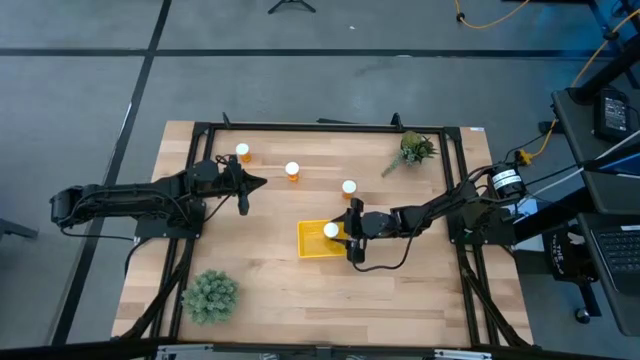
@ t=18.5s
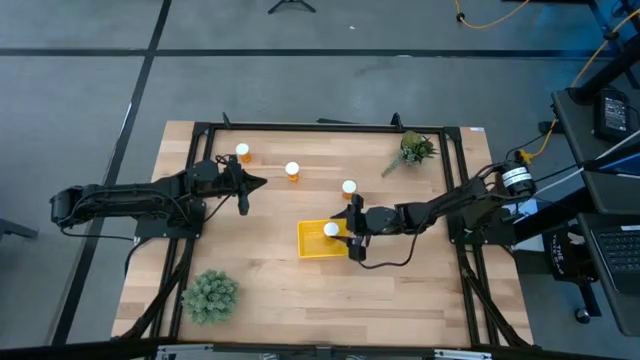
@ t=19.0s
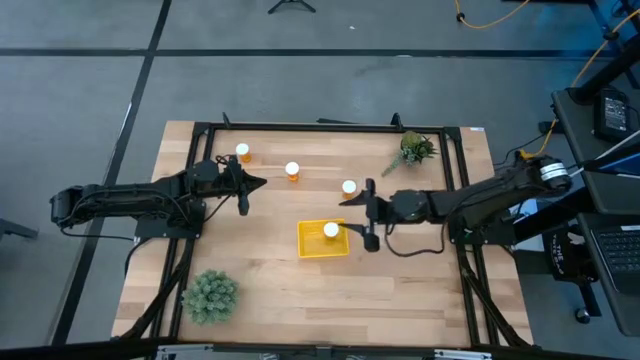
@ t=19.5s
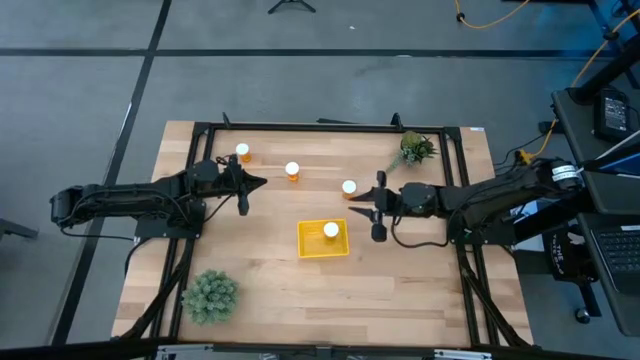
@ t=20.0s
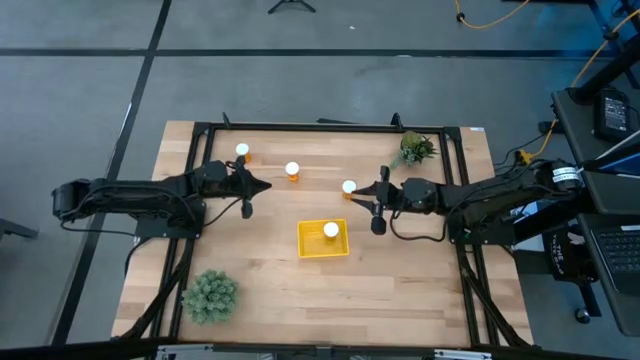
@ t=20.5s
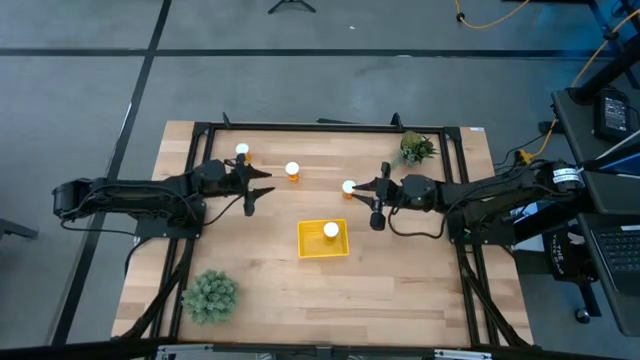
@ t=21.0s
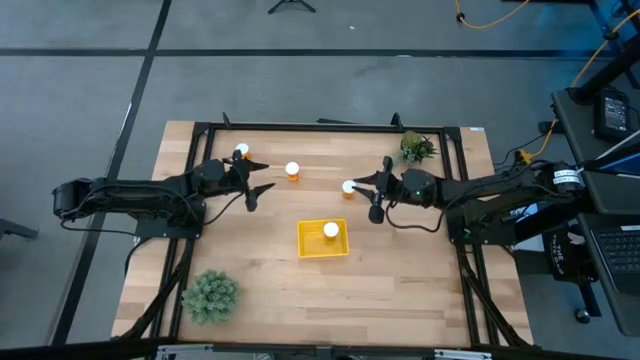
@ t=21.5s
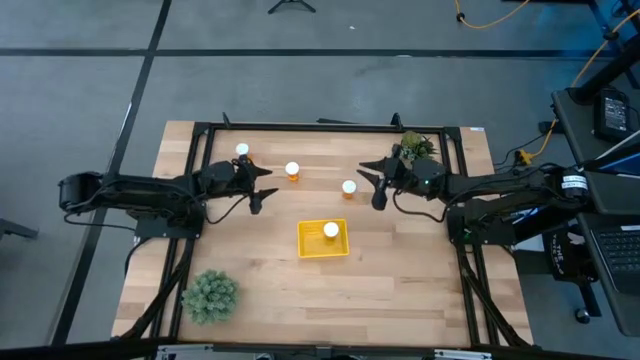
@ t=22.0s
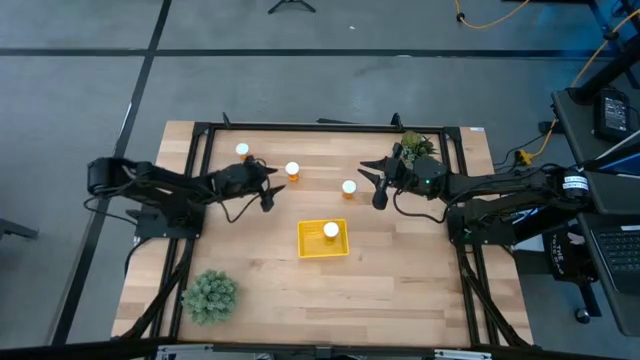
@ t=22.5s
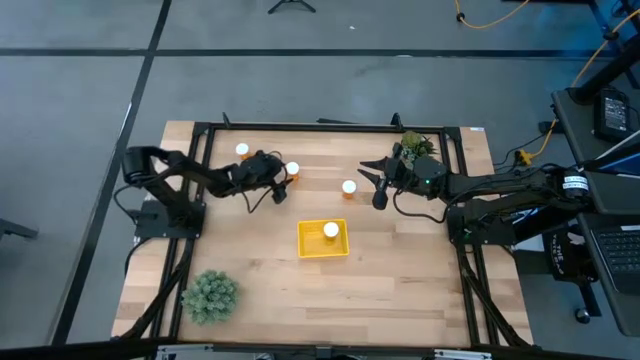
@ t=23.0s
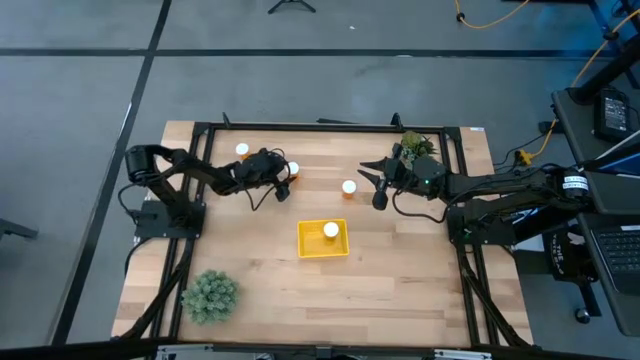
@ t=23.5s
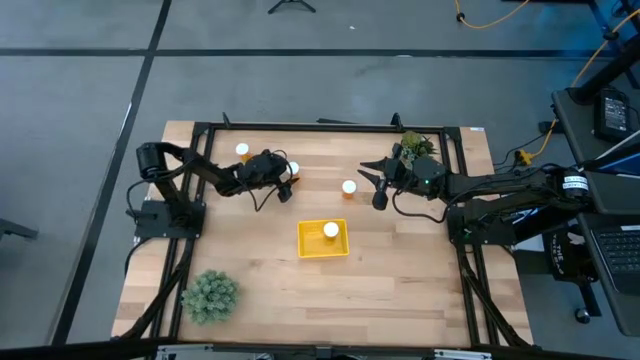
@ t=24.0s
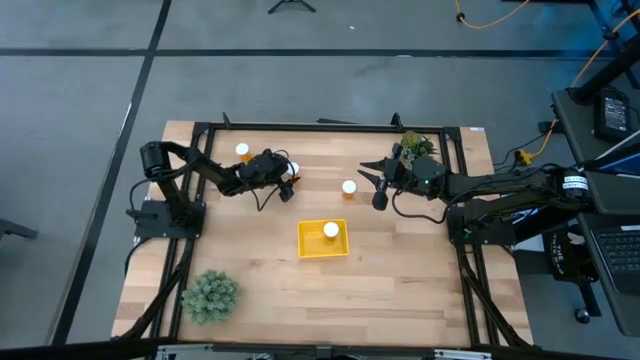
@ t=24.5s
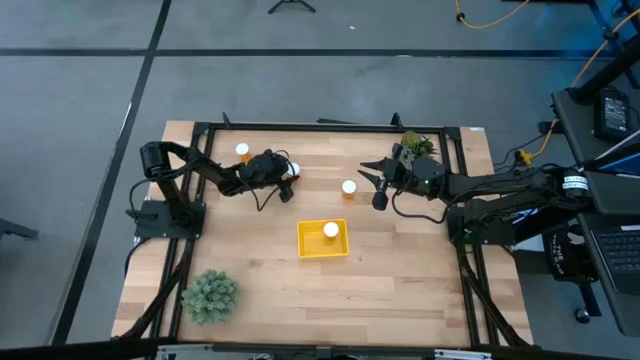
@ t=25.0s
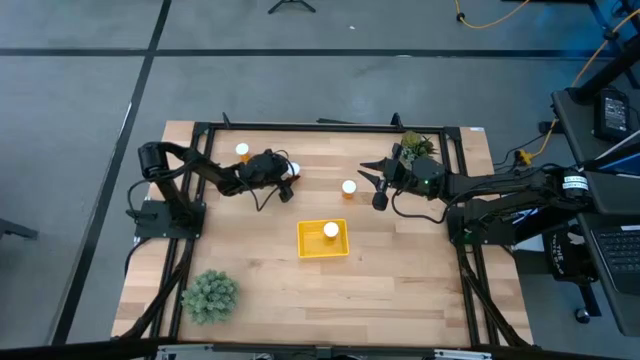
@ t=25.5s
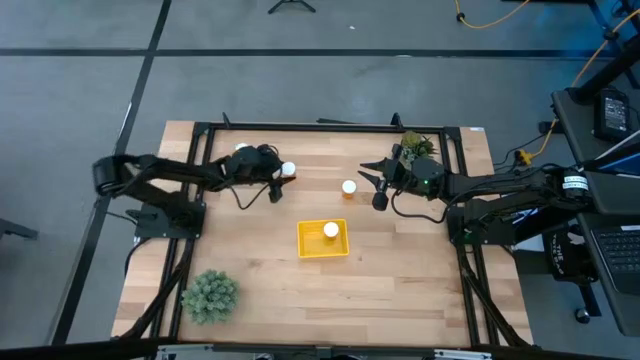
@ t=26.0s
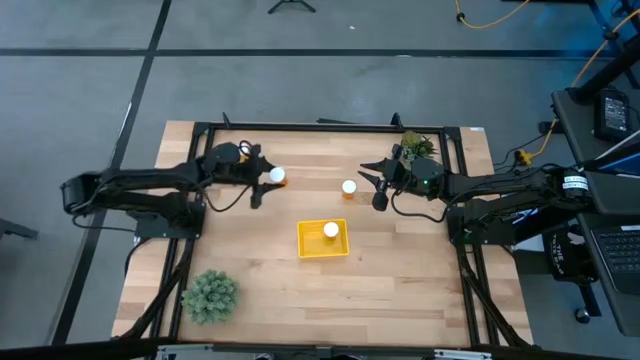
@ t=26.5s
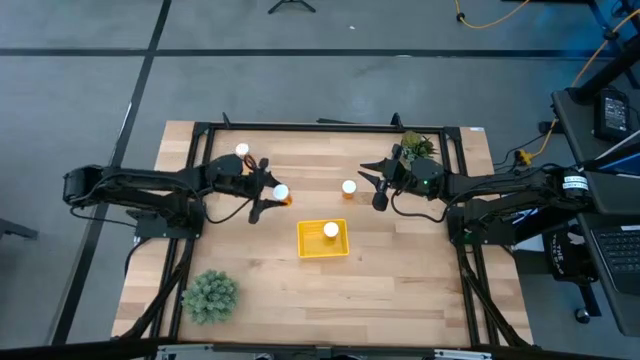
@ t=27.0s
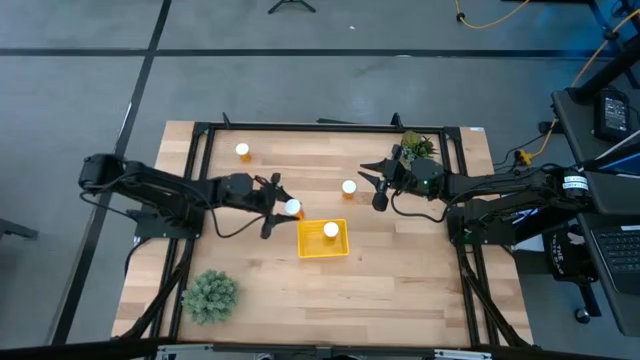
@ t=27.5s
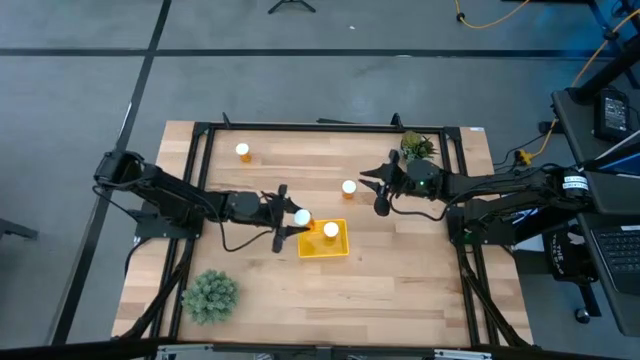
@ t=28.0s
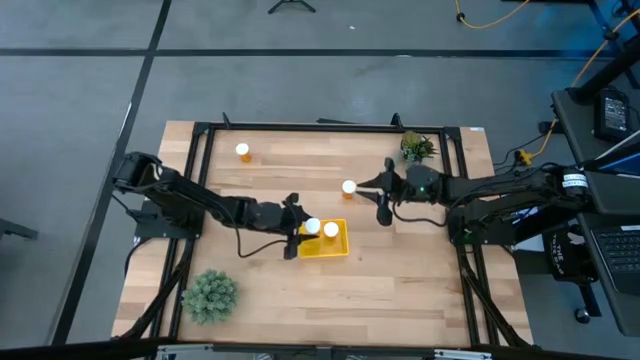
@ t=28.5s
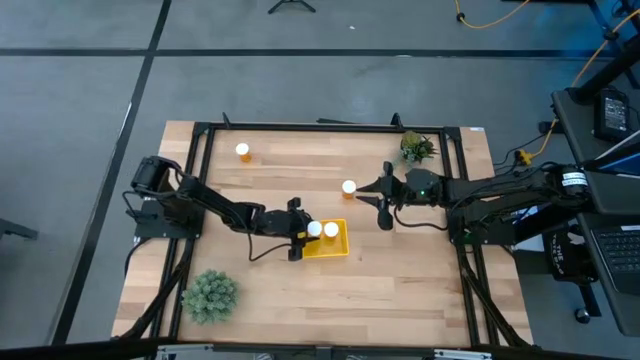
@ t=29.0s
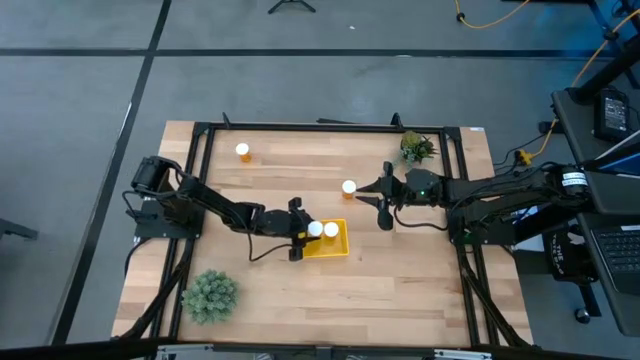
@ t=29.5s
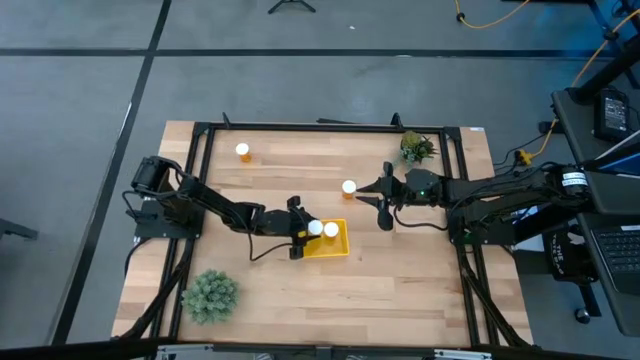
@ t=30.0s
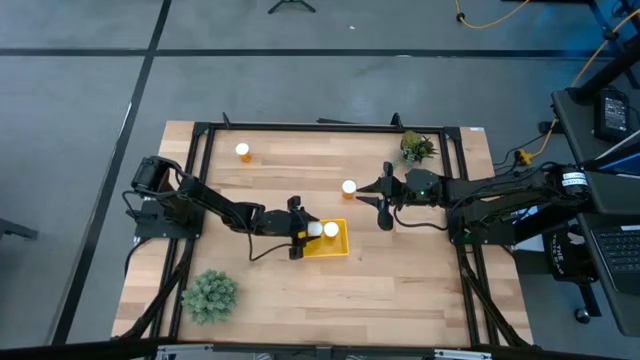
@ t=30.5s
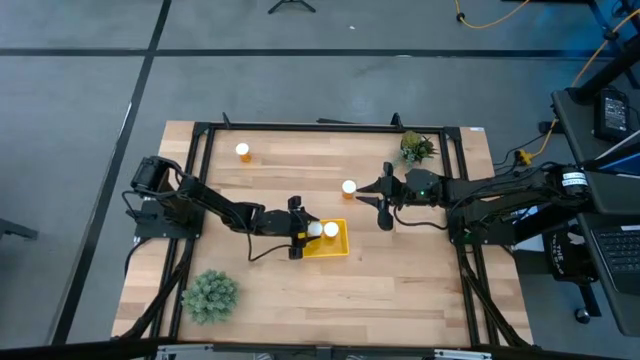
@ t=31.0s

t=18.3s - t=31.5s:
Task: Pick and place pill bottles into a basket
Put the orange pill bottle into the yellow bin

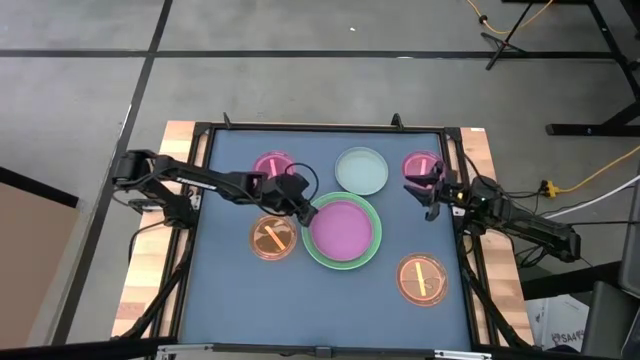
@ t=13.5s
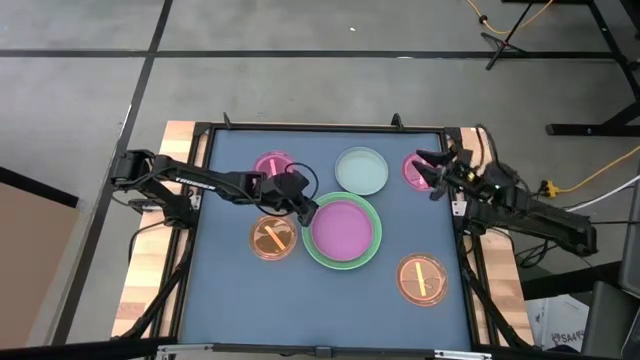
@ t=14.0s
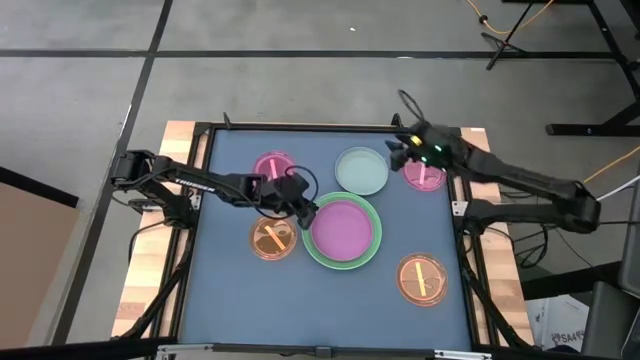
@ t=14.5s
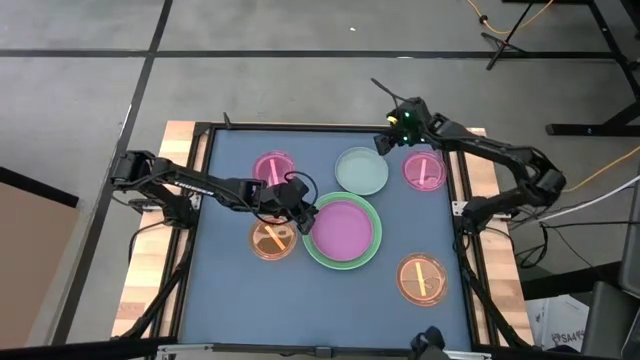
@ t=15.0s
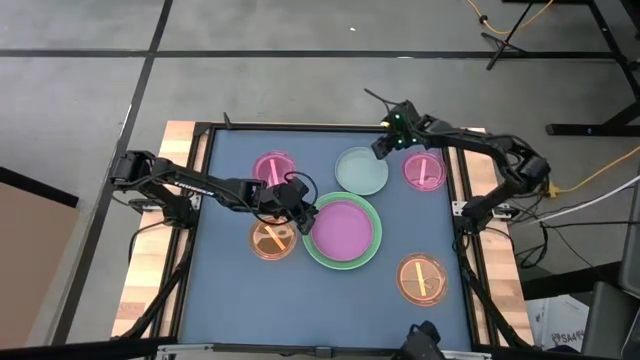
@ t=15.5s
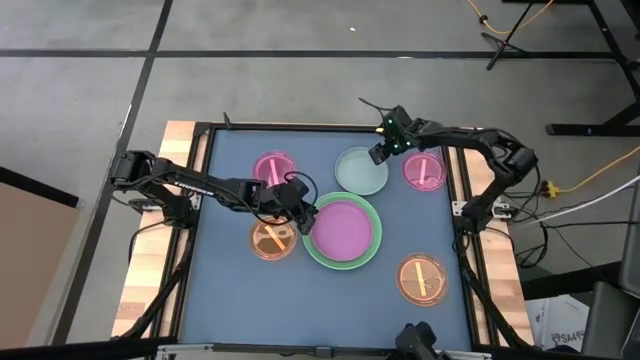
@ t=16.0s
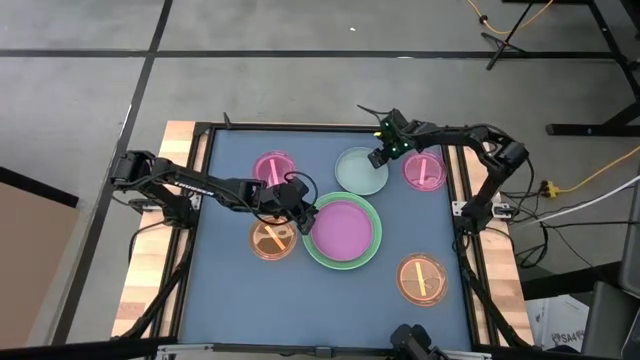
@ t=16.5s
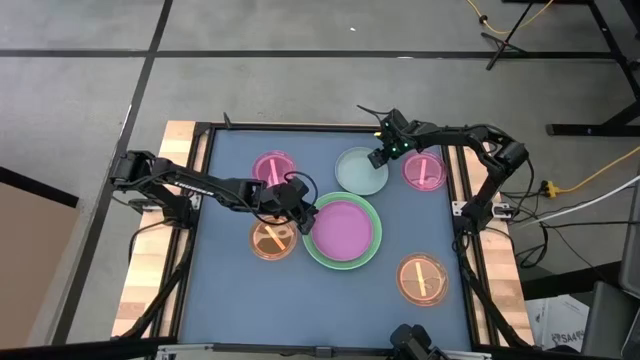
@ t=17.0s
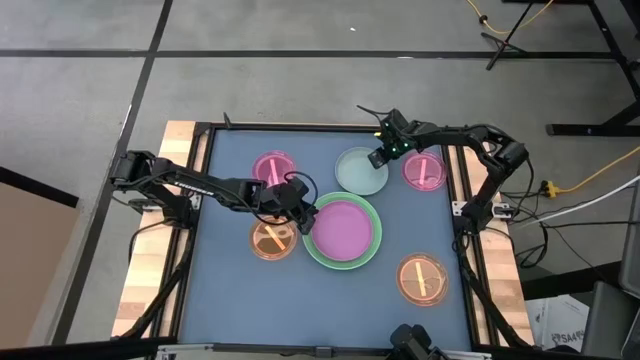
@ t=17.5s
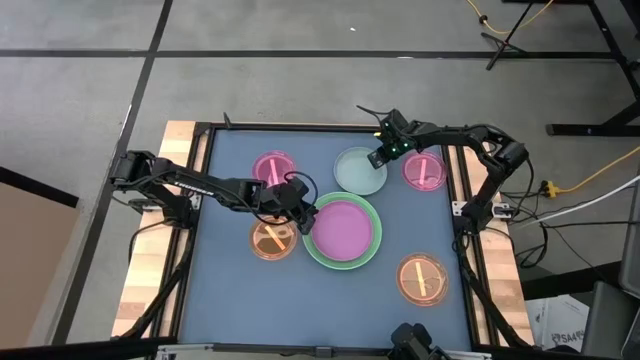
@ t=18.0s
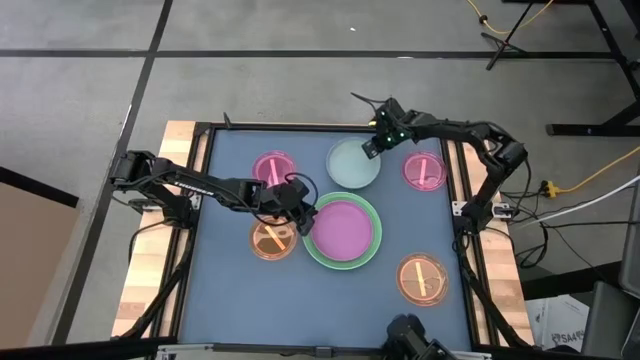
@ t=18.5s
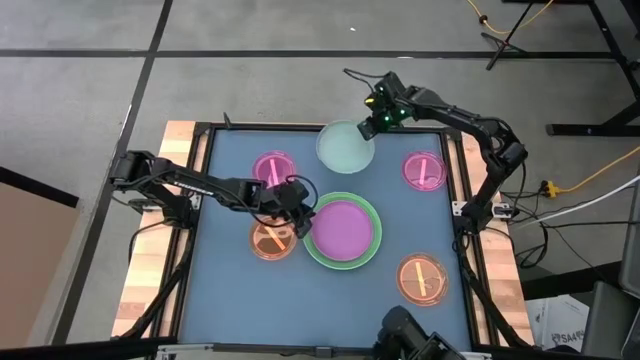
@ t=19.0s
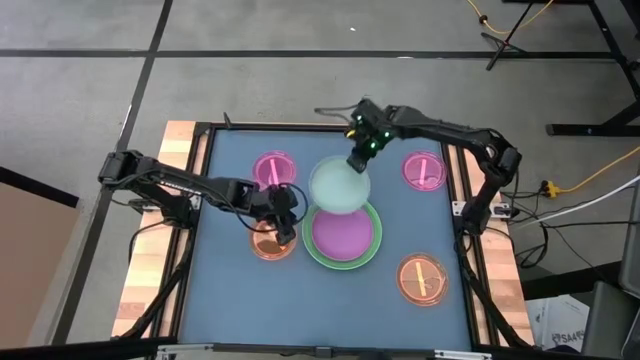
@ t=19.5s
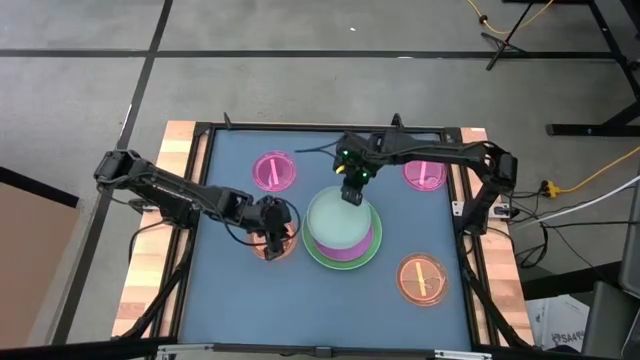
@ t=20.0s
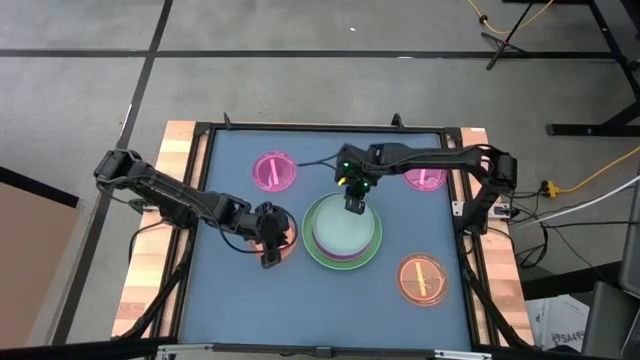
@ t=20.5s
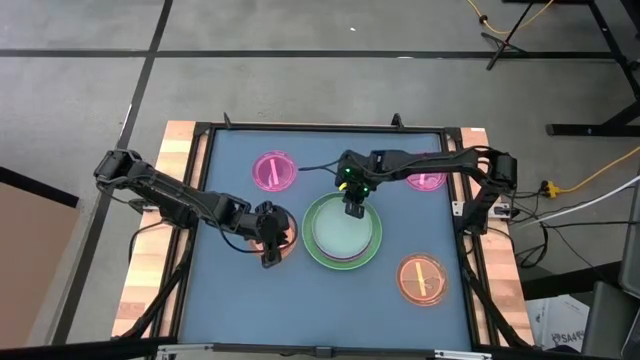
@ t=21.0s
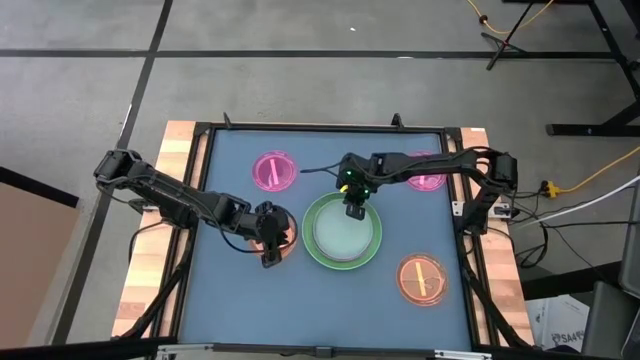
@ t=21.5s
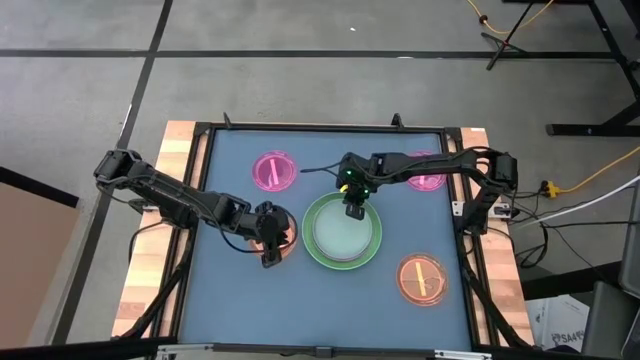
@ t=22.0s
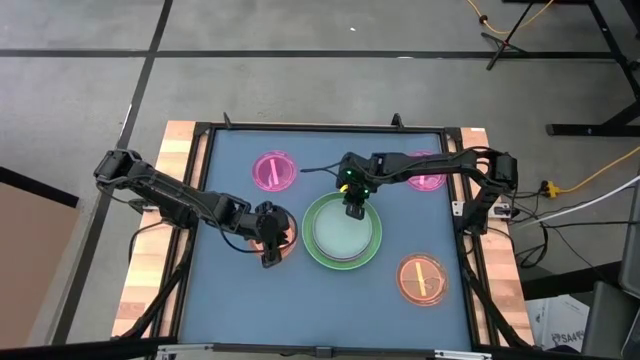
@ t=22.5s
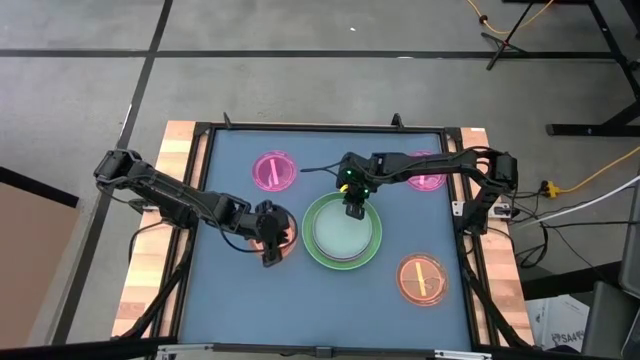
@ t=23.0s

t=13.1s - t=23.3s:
Task: Stack plastic plates
Stack the gray plate on top of the pink plate
